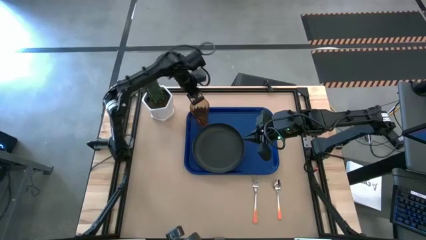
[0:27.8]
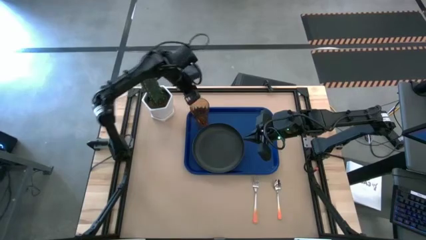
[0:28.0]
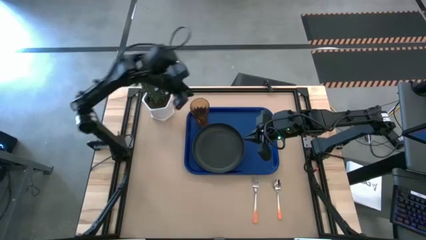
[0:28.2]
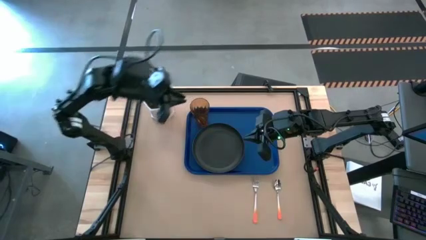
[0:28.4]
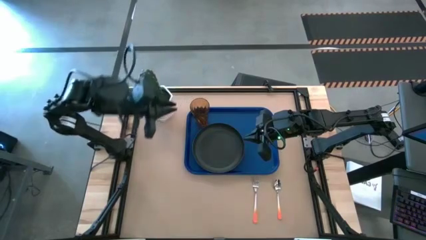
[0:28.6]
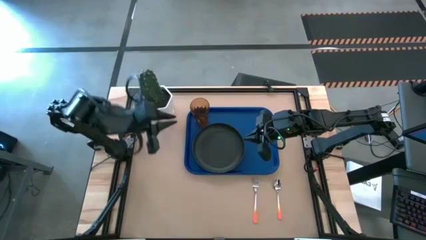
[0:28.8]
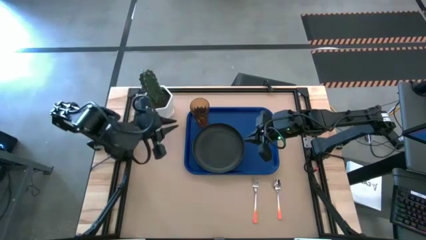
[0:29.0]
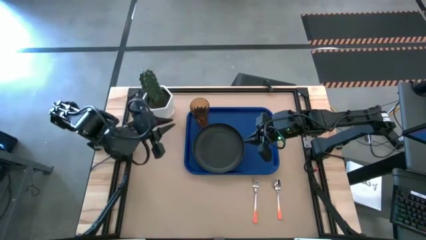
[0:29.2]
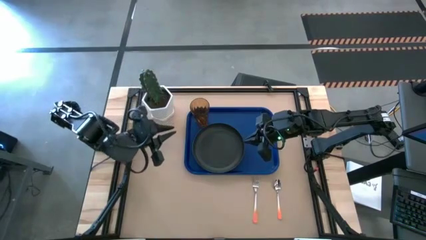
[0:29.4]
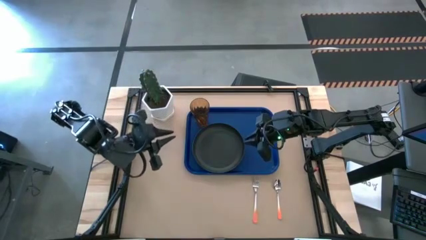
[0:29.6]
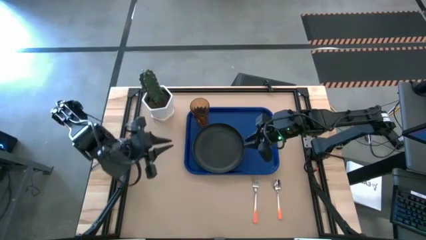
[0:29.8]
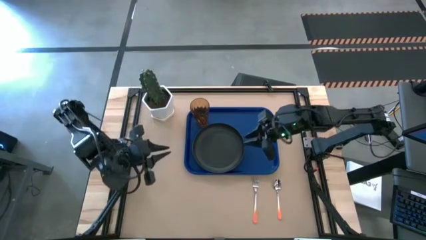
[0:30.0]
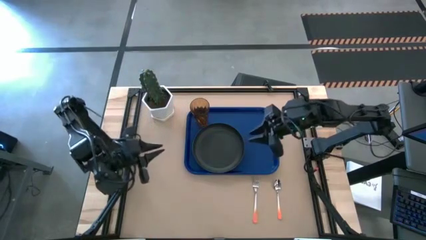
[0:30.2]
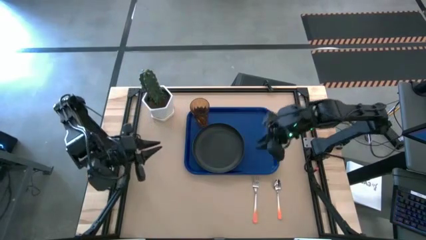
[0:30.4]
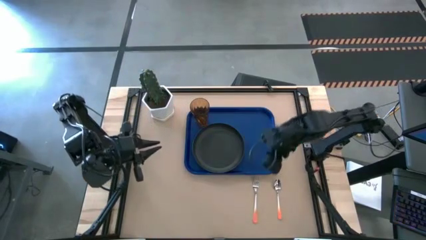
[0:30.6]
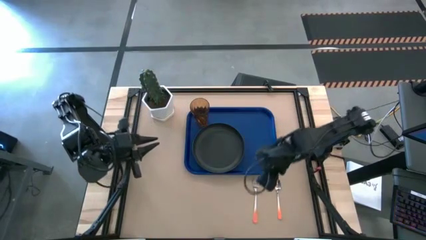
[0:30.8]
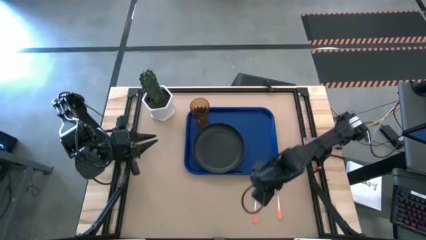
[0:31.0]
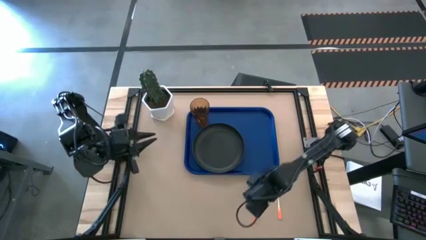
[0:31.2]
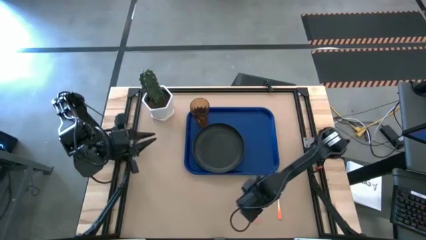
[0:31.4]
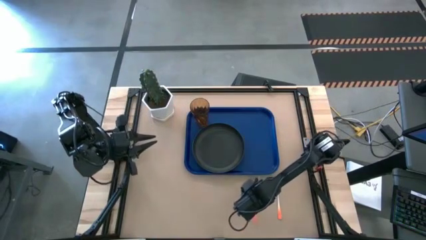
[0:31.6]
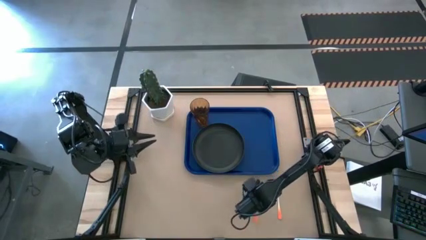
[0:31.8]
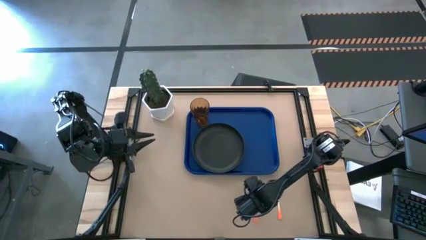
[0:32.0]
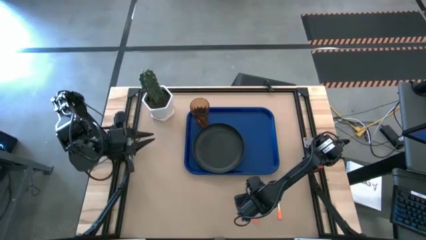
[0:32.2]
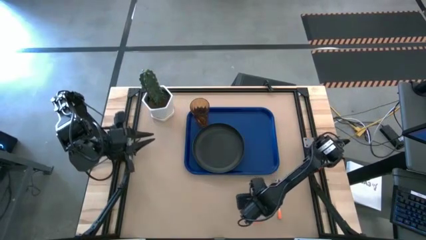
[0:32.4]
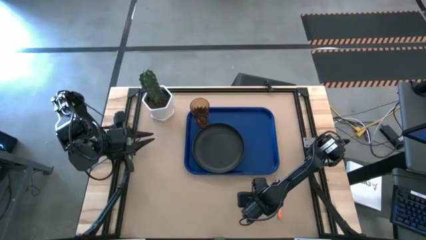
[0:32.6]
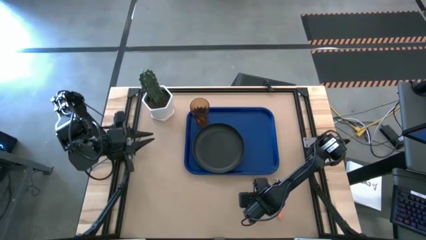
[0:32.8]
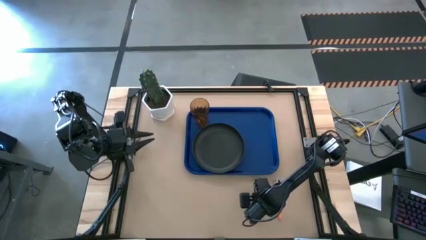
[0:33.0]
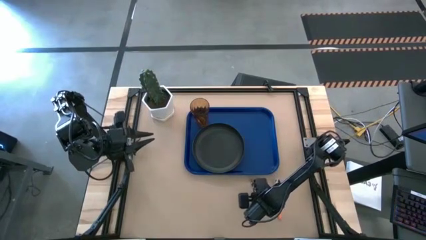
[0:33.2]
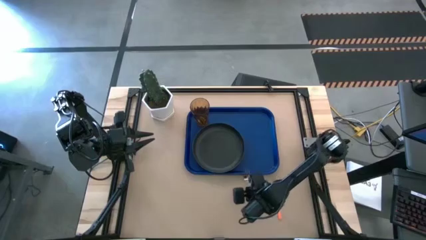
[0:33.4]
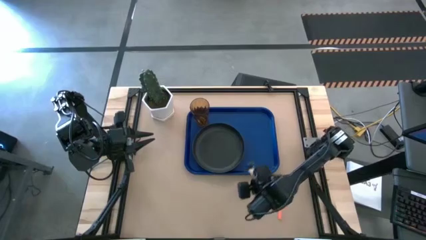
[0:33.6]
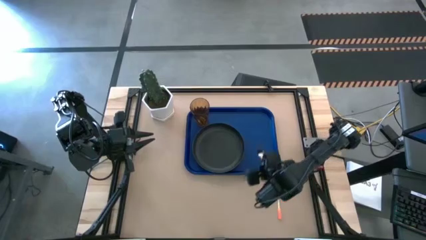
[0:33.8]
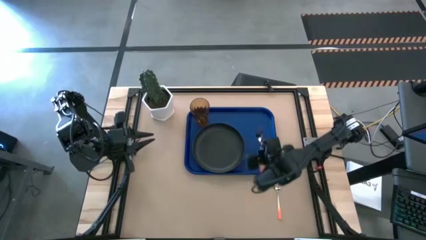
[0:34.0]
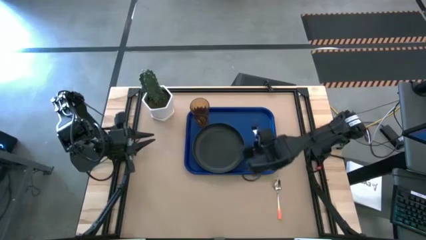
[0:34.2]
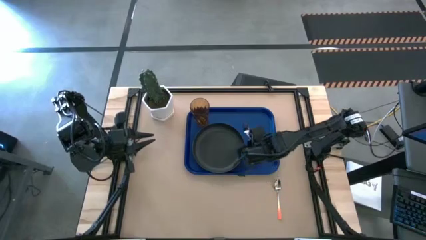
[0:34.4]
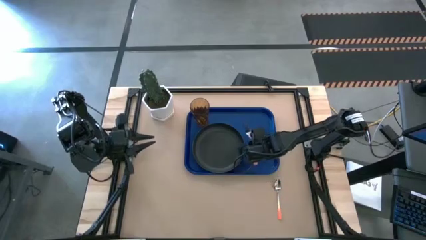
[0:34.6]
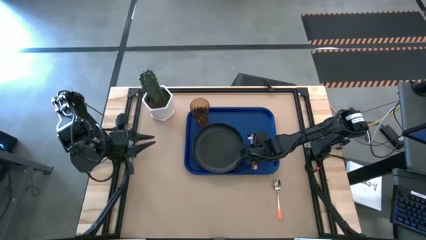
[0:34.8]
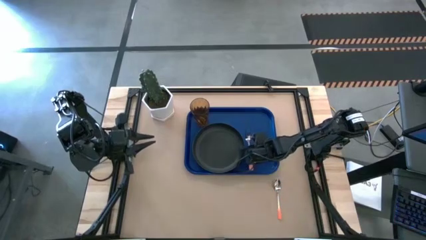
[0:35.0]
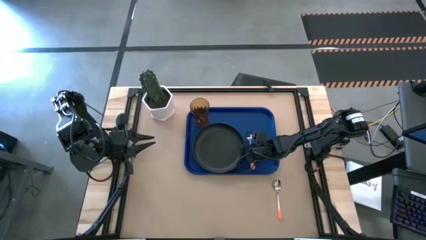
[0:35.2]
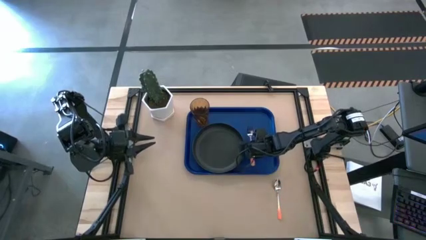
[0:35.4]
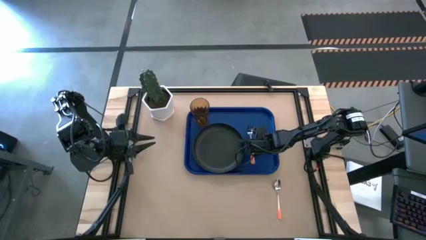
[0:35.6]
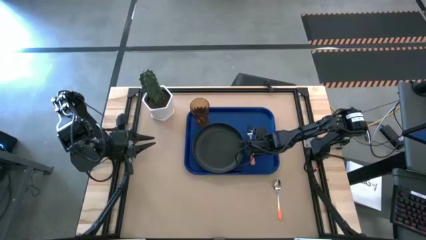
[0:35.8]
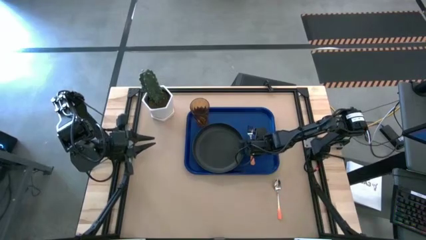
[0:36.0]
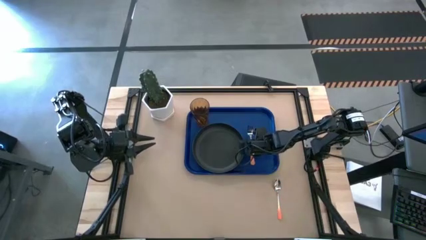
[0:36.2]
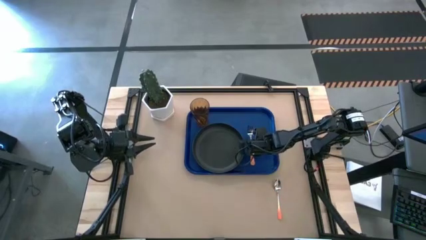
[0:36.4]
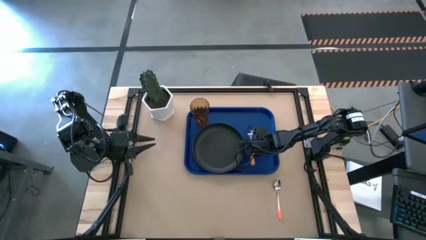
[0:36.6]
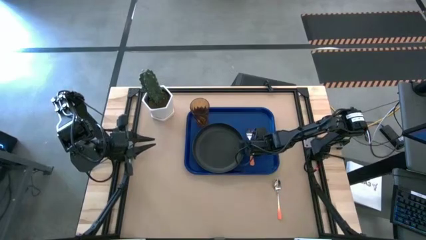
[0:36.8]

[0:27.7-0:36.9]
Task: Pick and place plate/cup/fork/spoon on tray
Put the orange fork on the blue tray

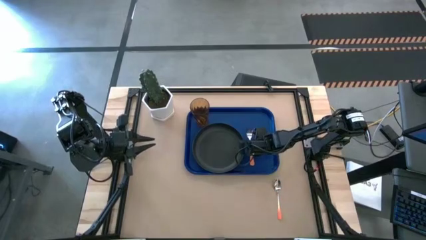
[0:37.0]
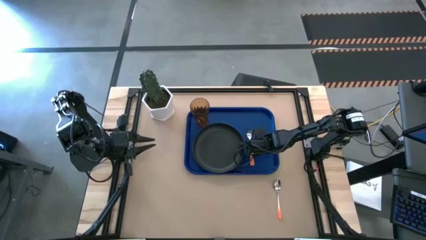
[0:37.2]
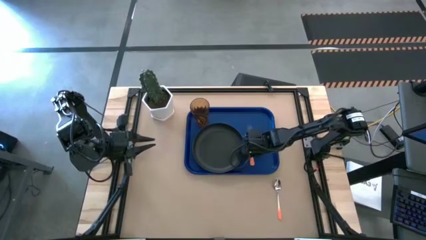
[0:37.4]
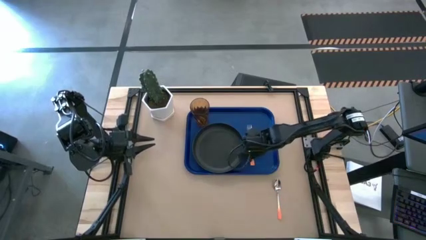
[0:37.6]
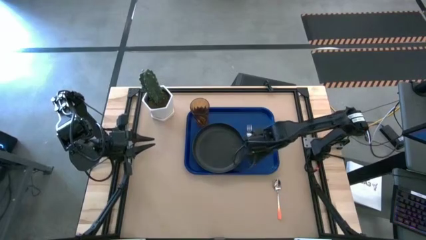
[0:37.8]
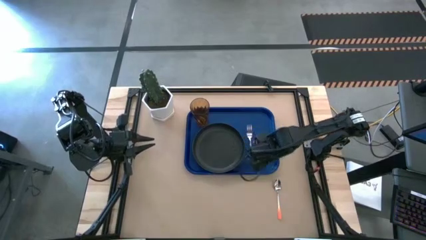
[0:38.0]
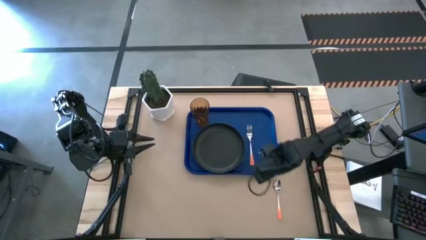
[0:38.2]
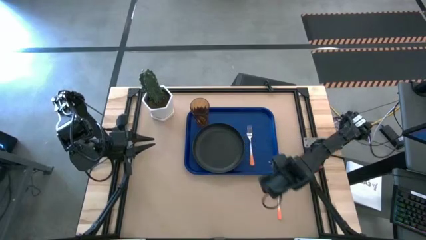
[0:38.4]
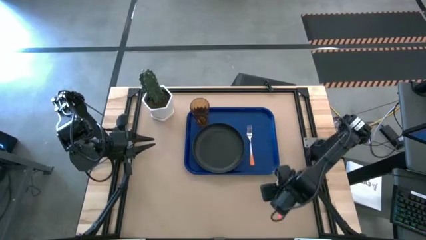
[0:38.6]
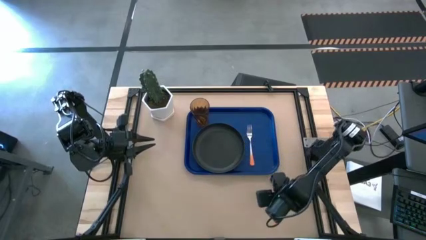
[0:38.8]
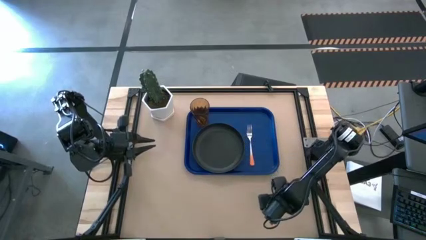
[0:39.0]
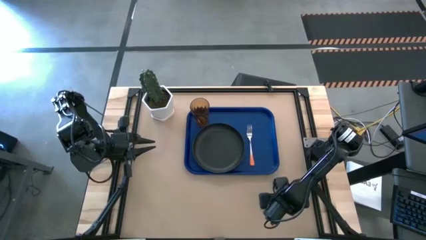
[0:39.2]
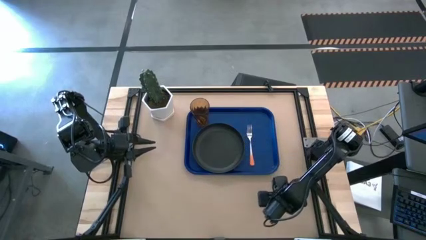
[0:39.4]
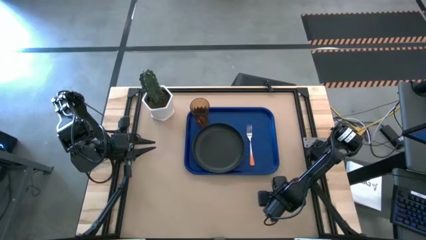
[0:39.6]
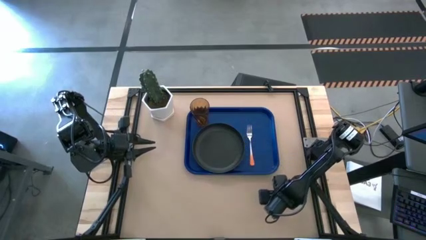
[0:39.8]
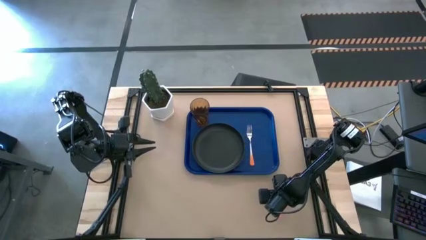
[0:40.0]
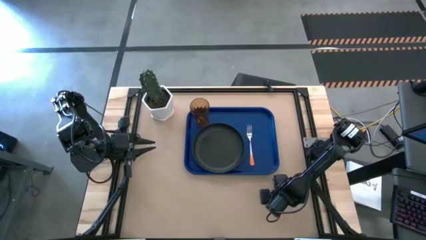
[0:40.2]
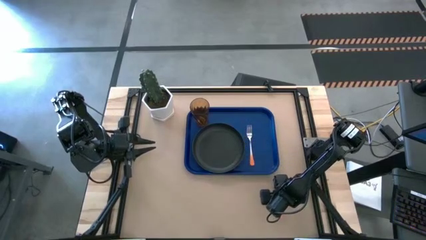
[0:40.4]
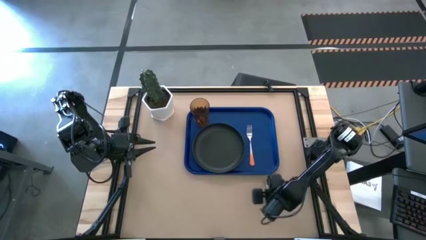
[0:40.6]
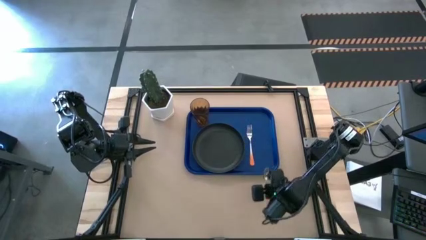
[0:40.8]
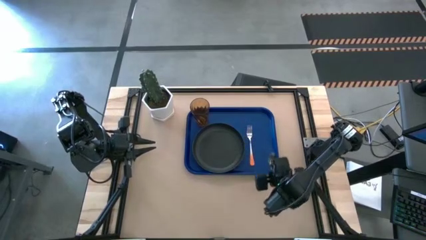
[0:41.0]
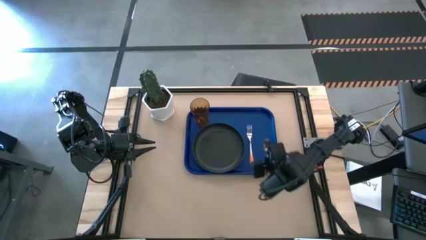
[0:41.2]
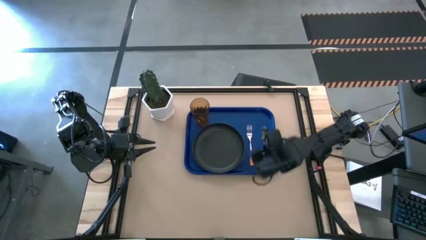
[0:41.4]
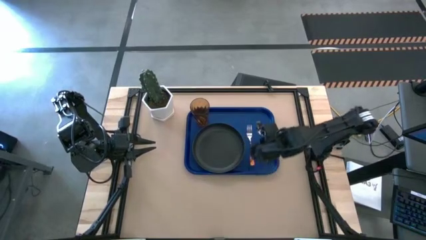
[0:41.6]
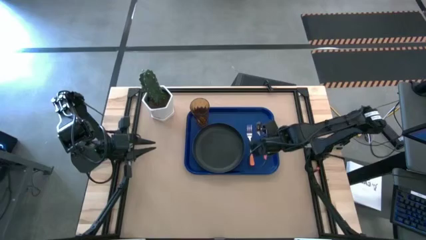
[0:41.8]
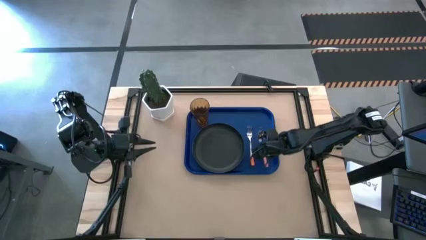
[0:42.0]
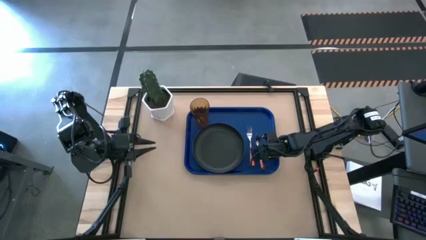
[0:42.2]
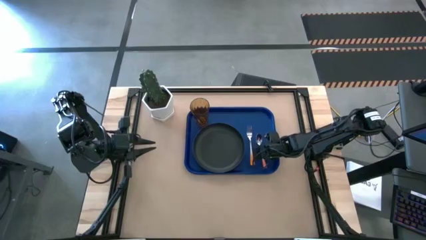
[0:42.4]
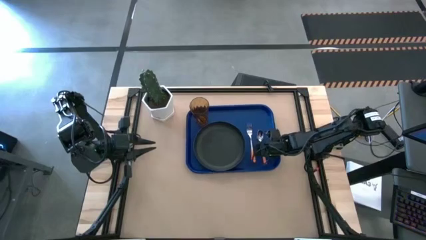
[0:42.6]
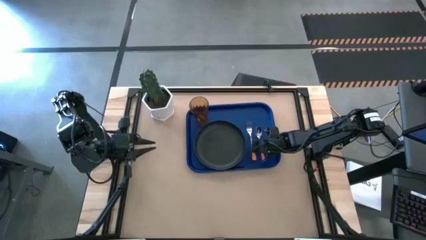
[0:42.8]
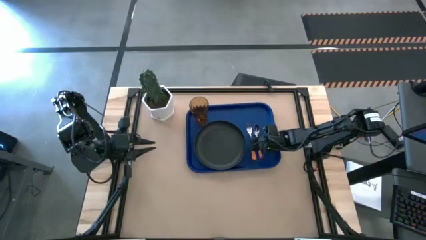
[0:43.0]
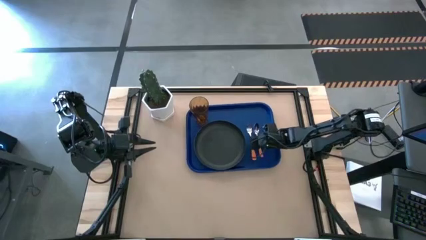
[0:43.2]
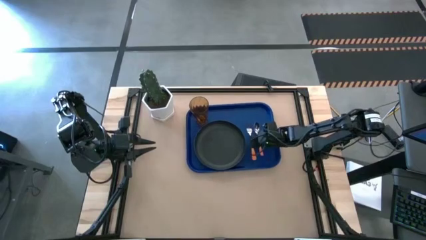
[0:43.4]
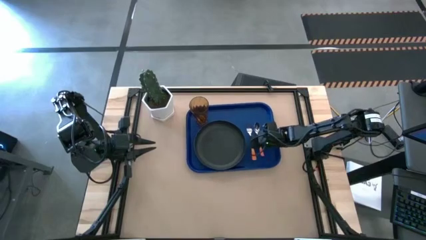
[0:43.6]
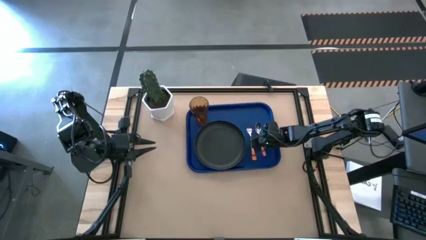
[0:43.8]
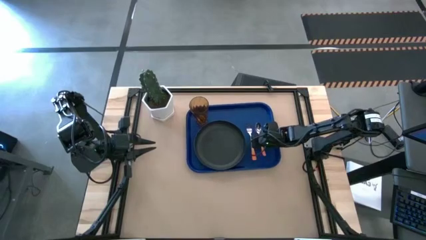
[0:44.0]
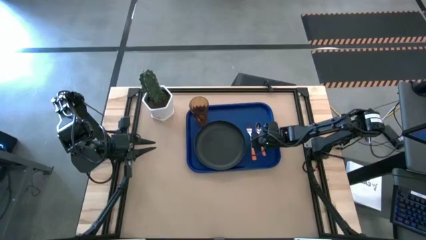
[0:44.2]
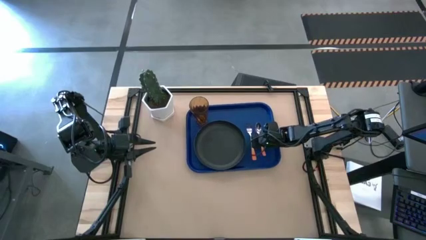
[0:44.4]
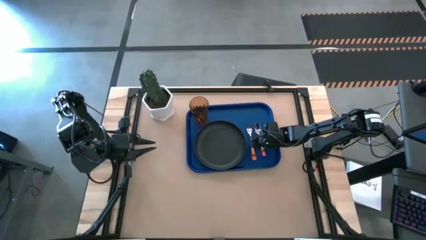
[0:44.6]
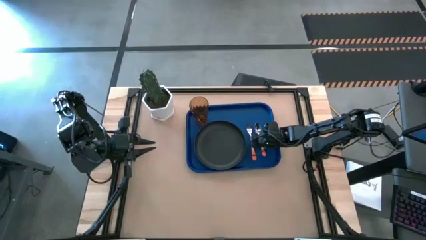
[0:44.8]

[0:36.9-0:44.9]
Put the orange spoon on the blue tray to the left of the orange fork
